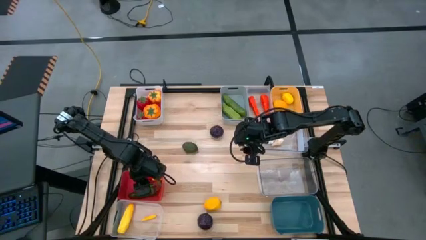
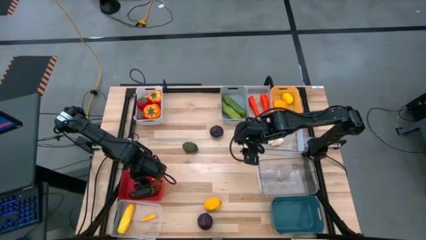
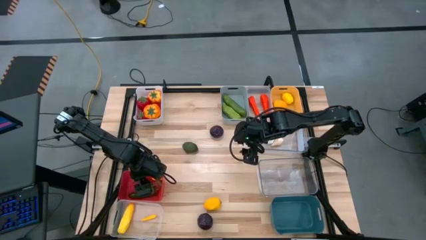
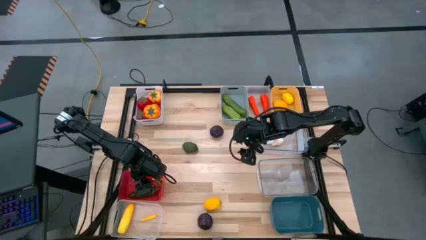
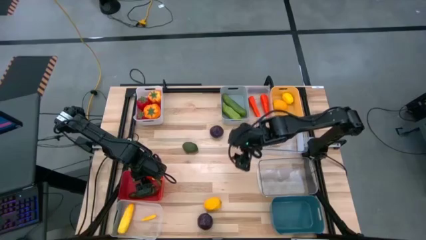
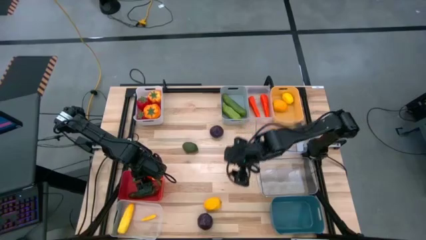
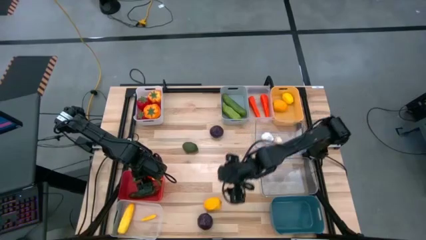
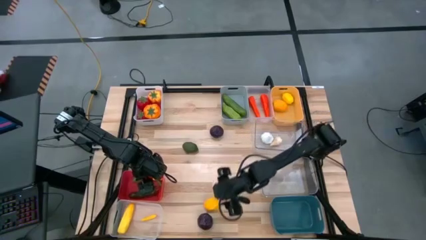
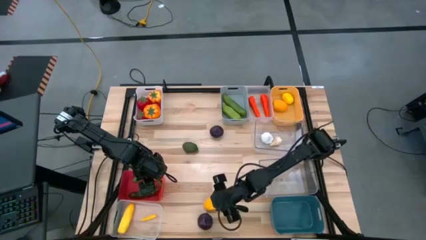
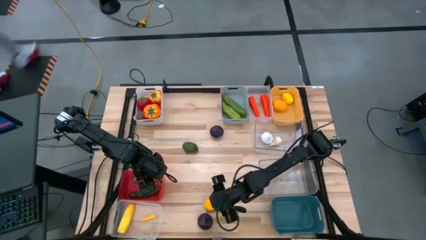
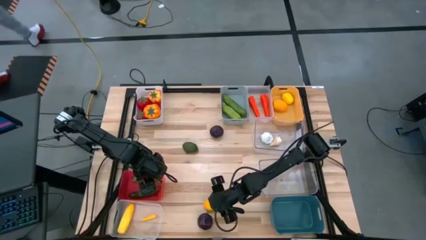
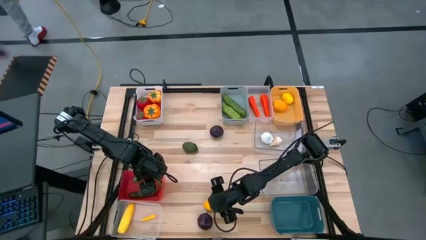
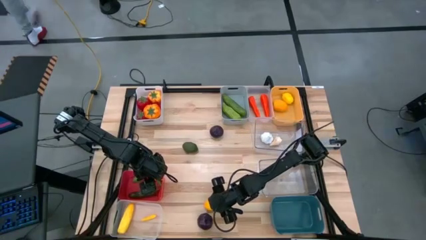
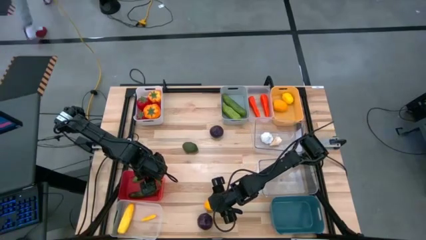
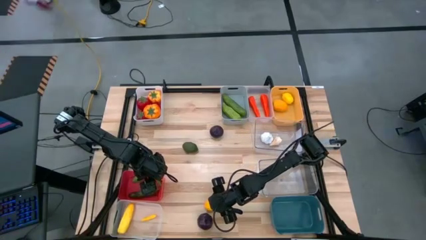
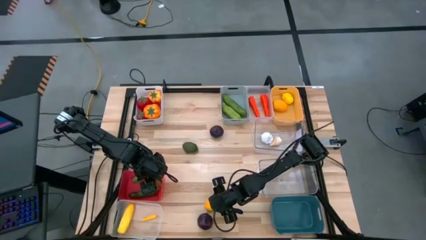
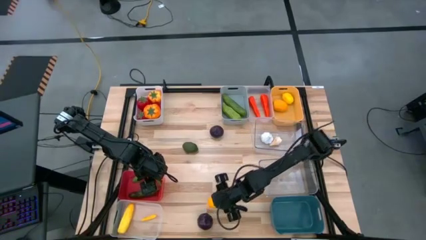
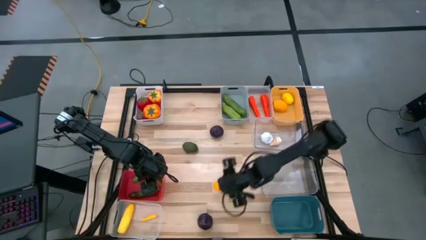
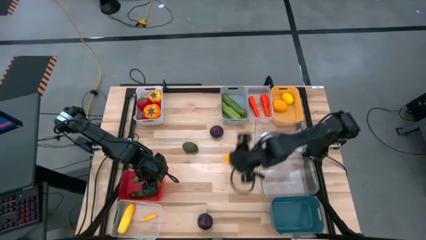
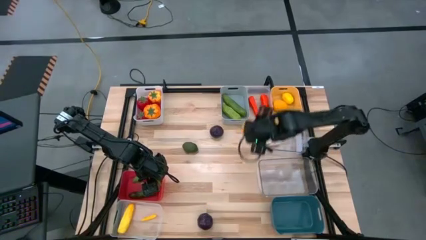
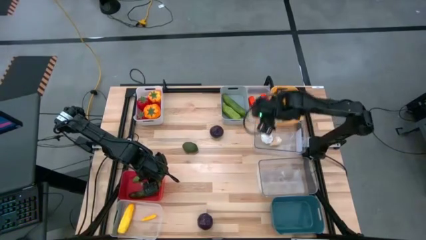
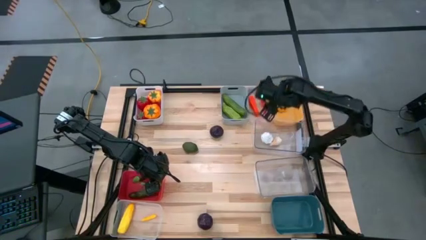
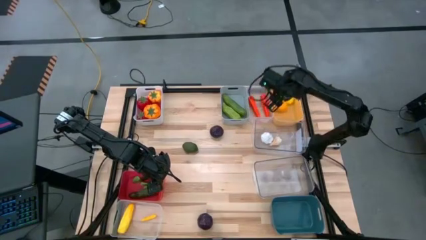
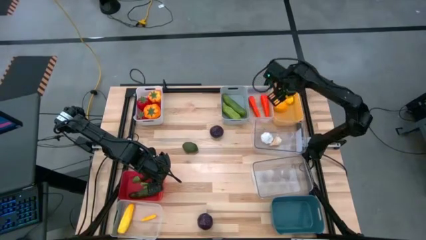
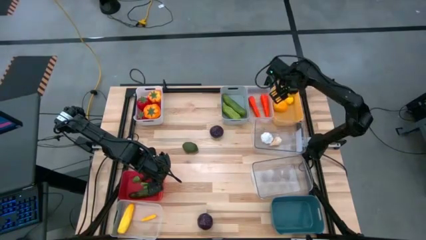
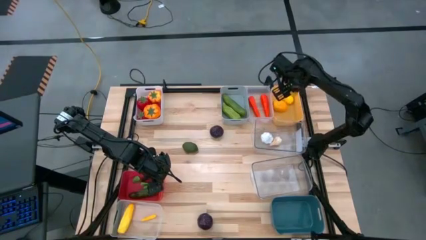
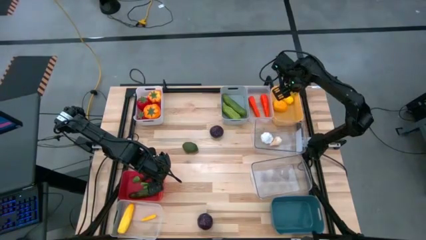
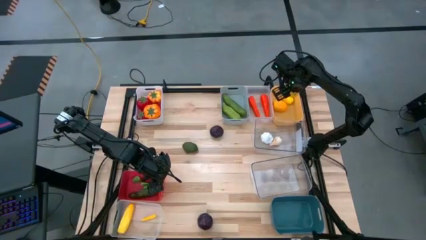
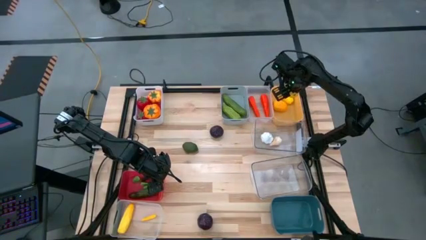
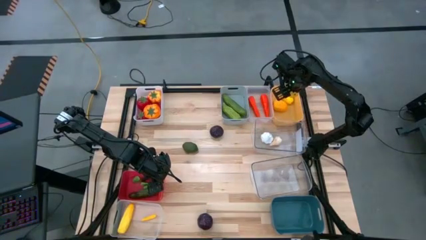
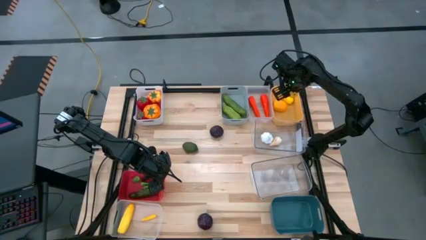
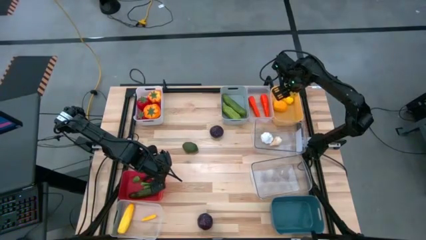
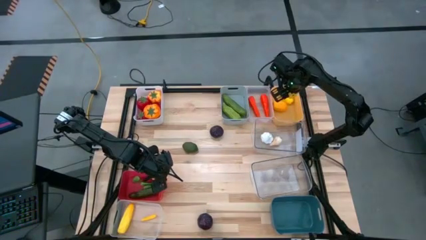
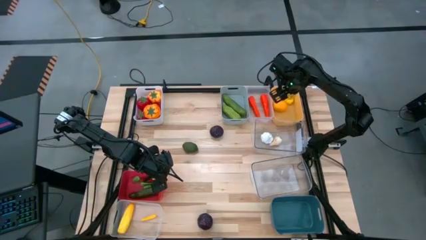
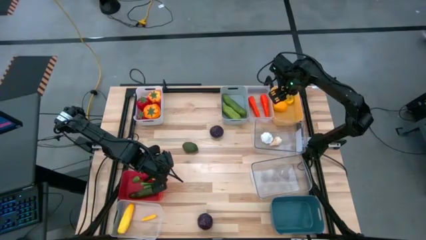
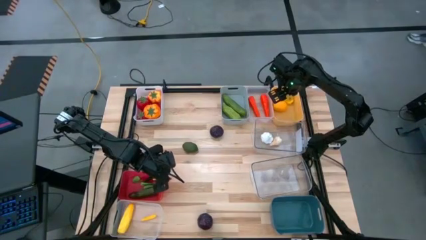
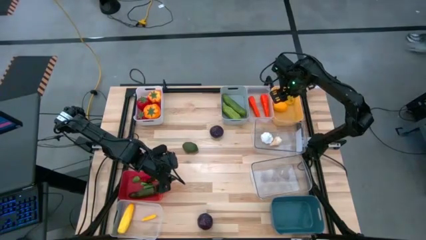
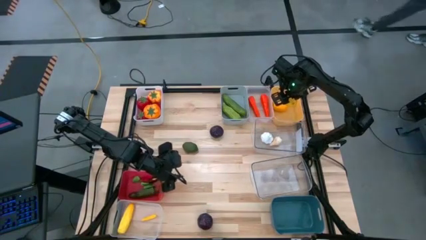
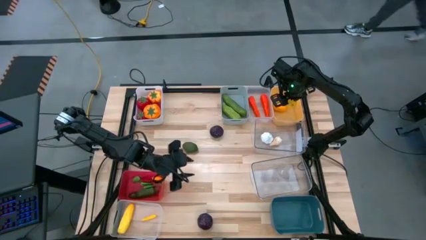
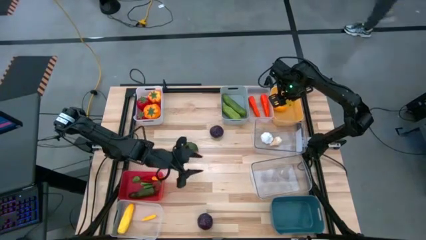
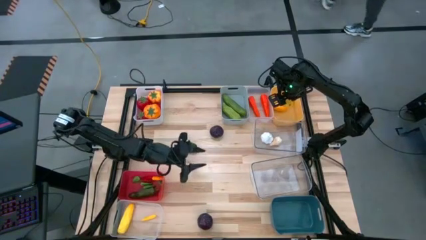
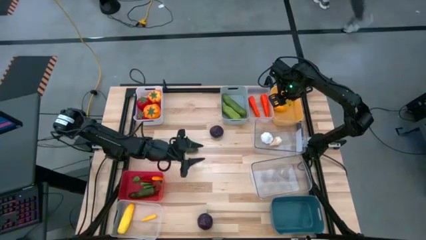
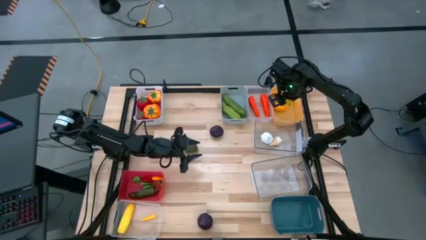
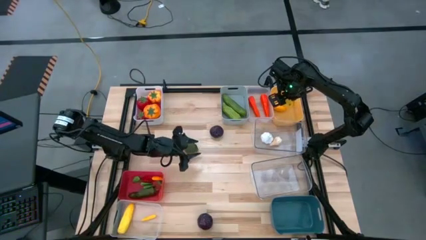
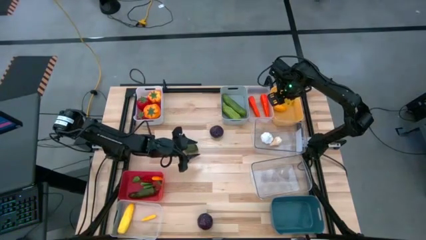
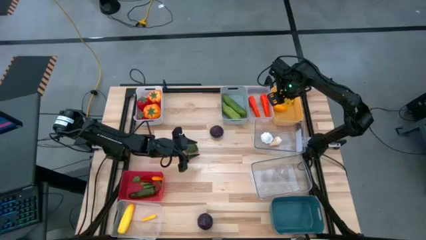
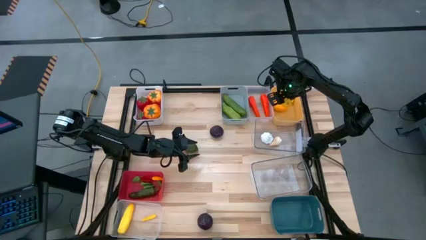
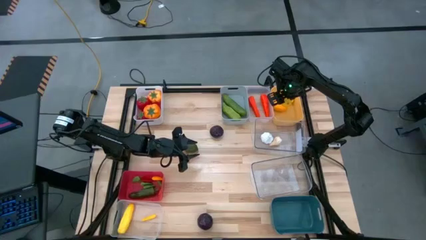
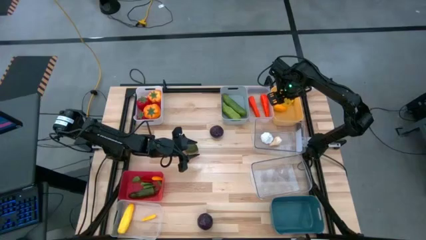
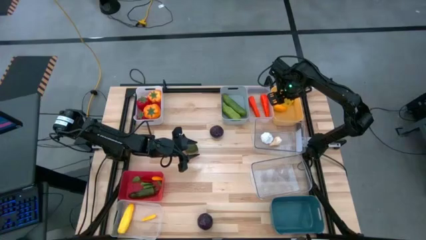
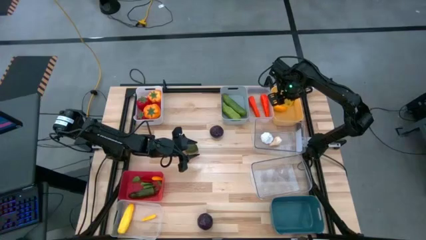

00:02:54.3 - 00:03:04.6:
Task: Sort produce into baskets
Put the yellow lemon into the yellow bin

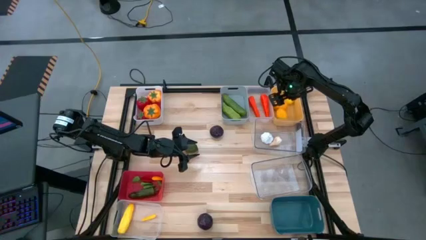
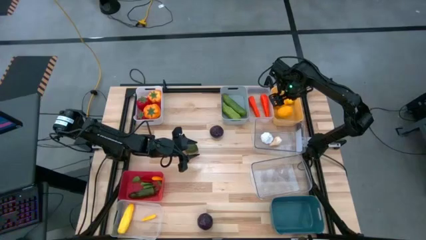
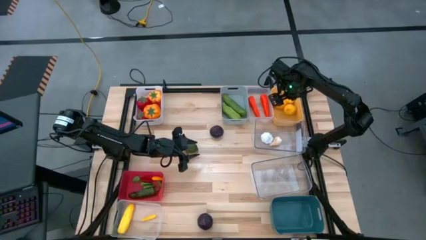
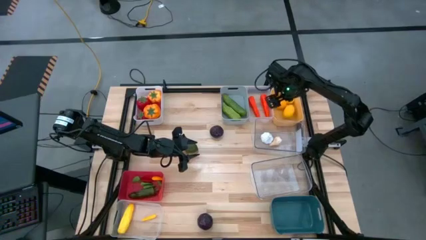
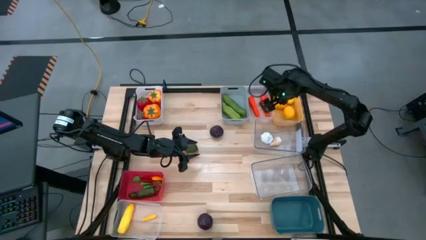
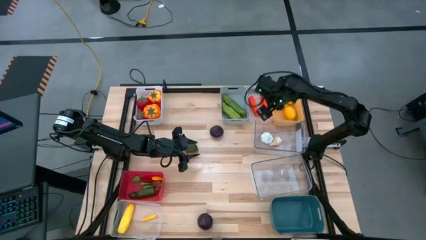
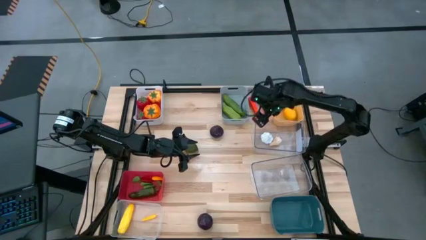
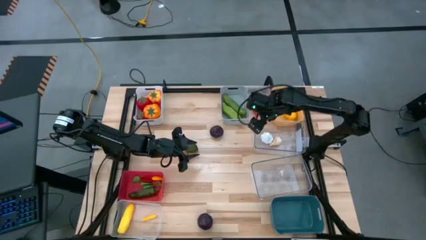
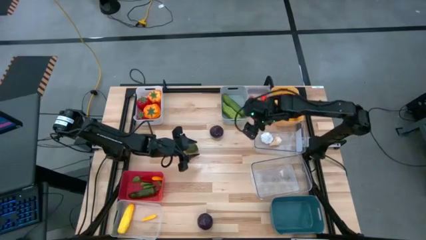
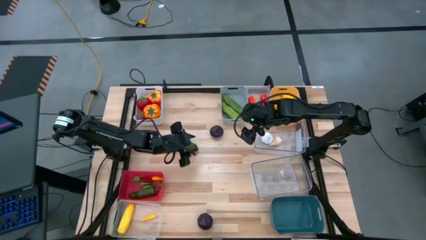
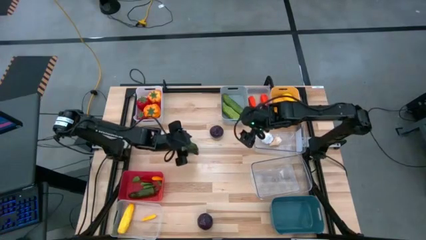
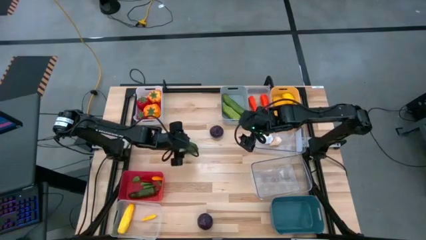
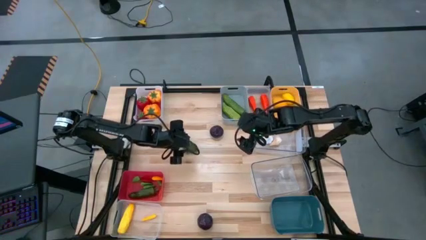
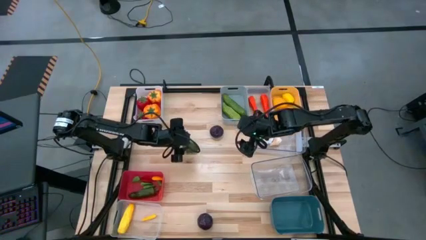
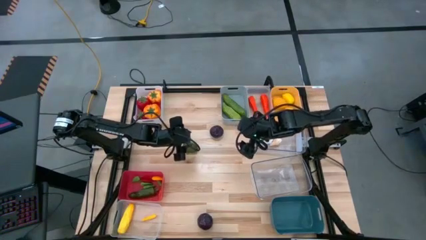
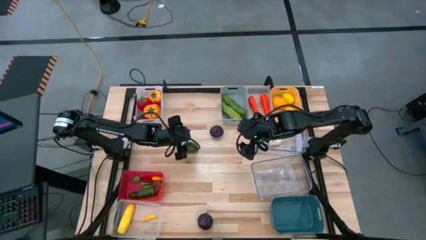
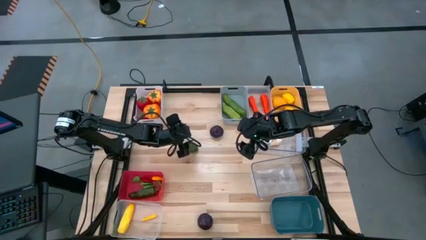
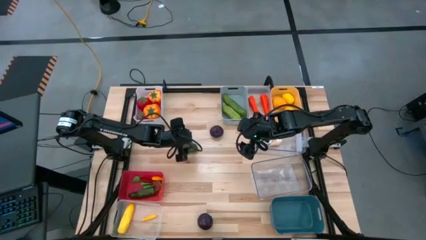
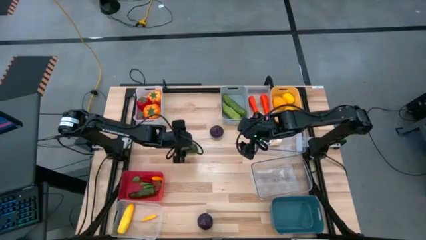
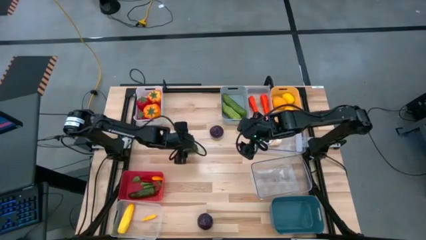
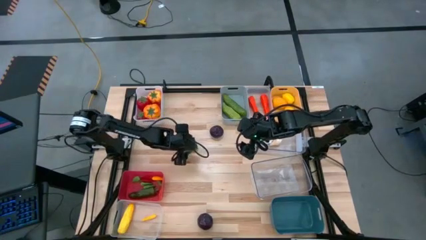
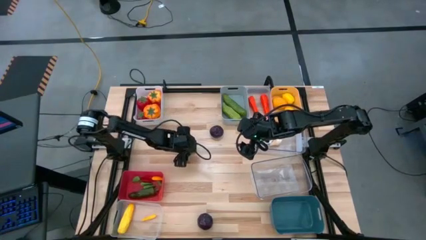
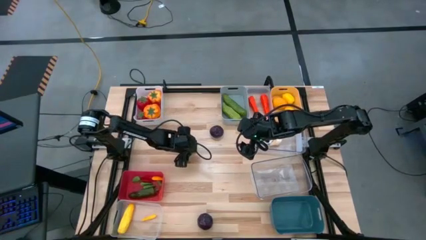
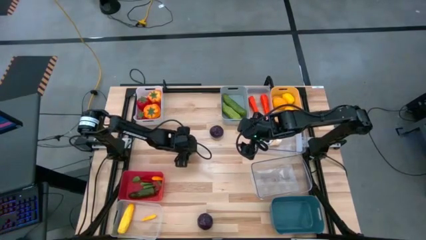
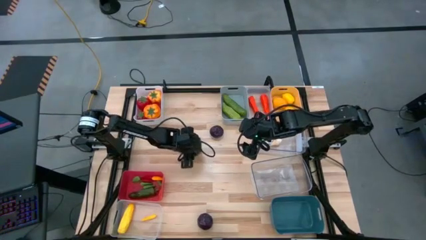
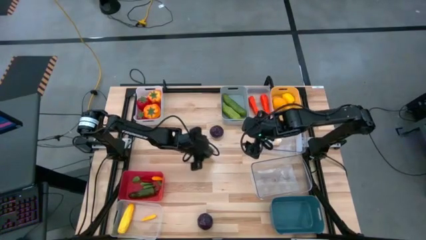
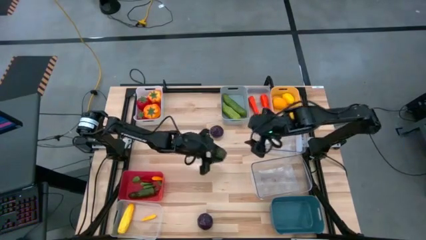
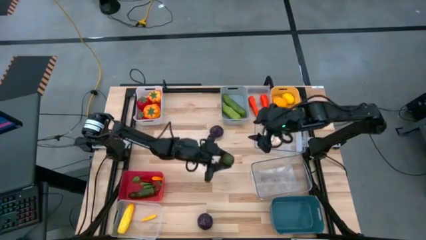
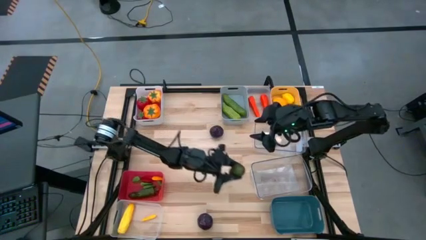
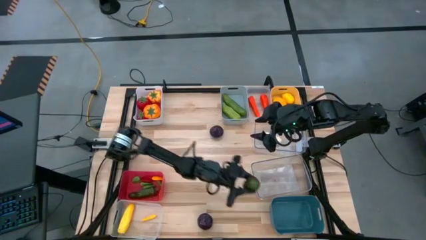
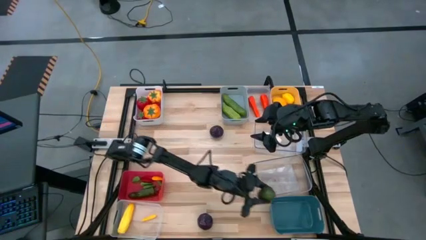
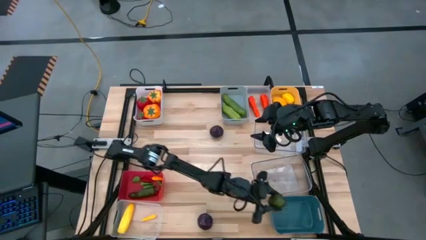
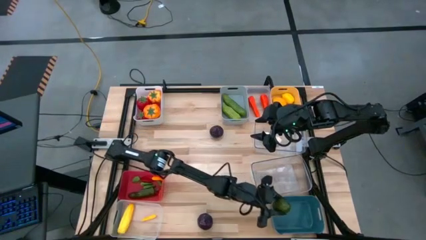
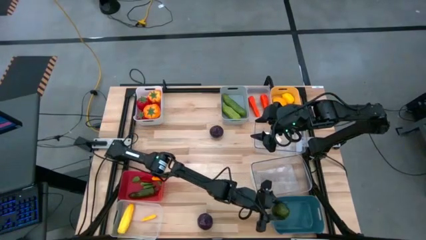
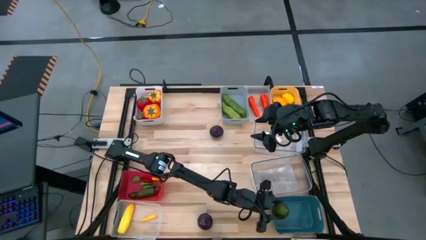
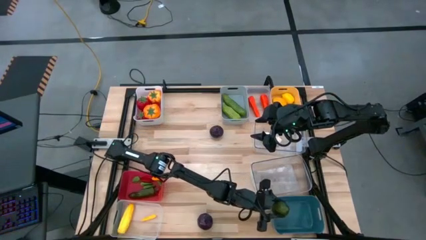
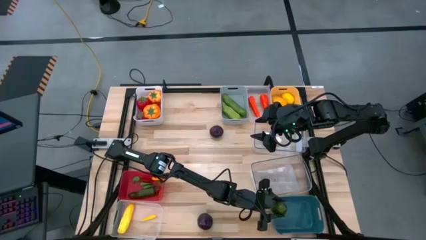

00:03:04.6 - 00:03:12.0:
Put the green lime into the blue bin
